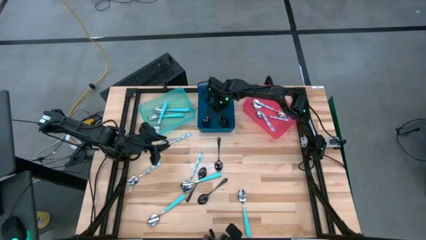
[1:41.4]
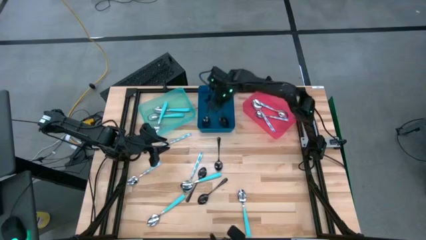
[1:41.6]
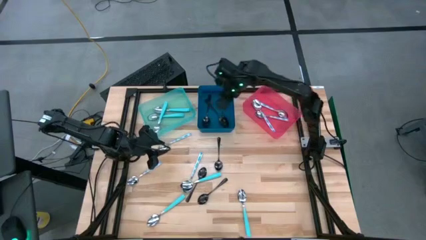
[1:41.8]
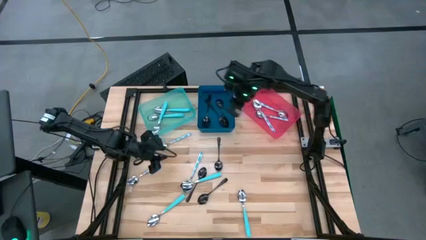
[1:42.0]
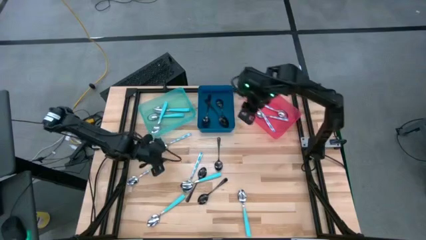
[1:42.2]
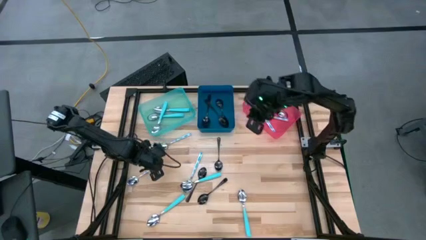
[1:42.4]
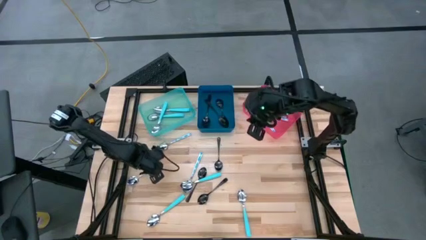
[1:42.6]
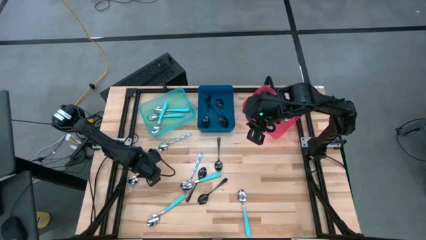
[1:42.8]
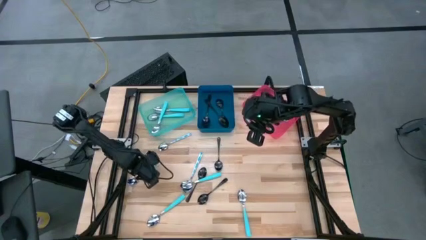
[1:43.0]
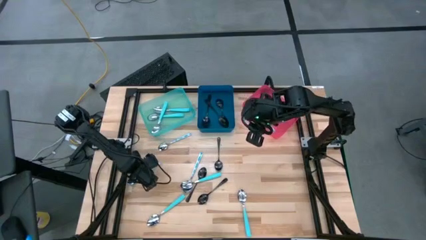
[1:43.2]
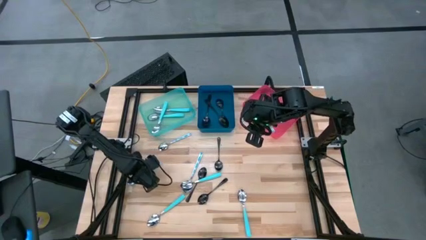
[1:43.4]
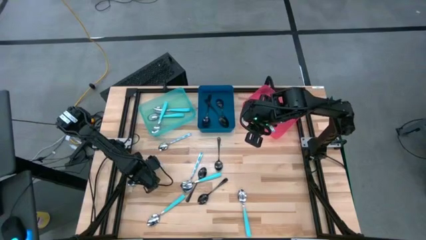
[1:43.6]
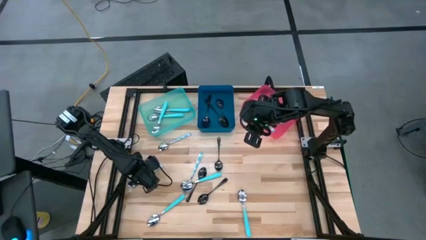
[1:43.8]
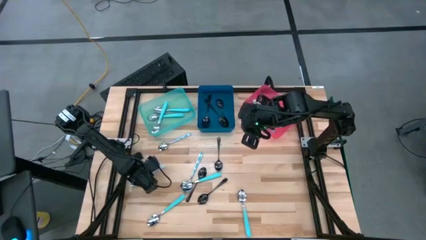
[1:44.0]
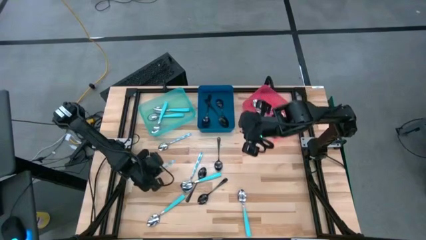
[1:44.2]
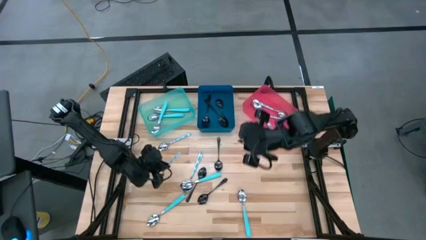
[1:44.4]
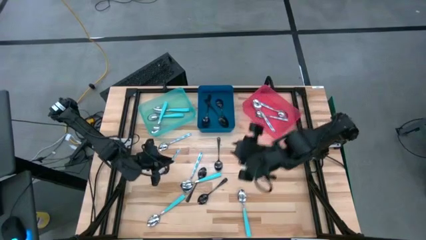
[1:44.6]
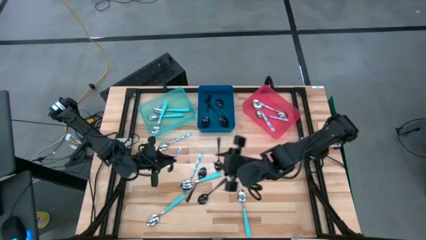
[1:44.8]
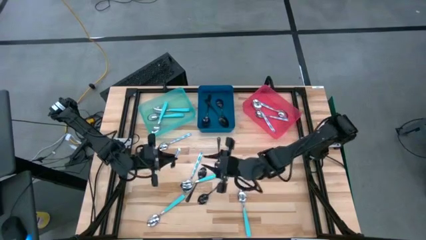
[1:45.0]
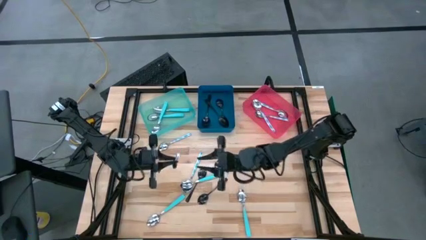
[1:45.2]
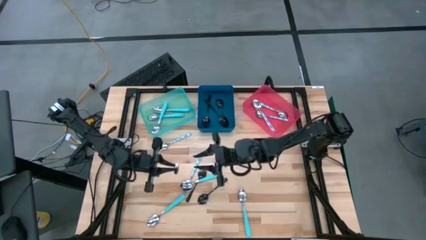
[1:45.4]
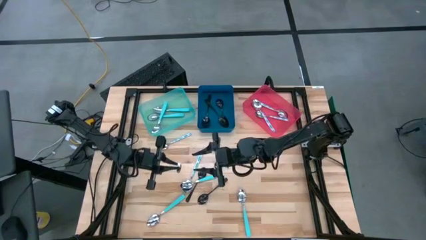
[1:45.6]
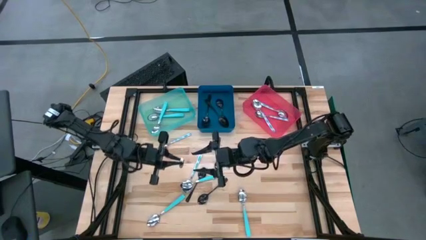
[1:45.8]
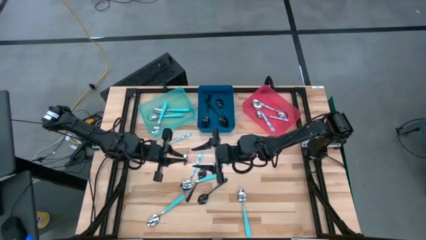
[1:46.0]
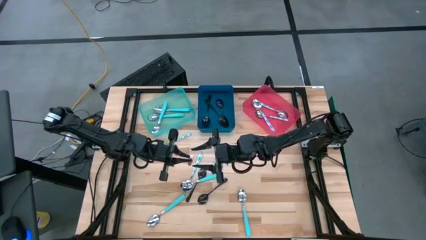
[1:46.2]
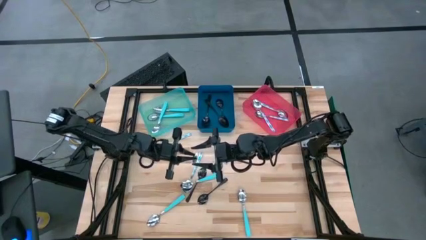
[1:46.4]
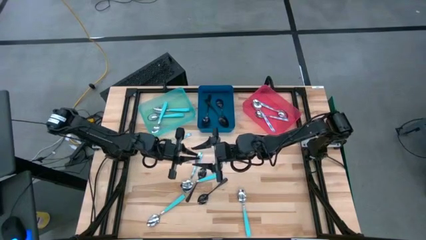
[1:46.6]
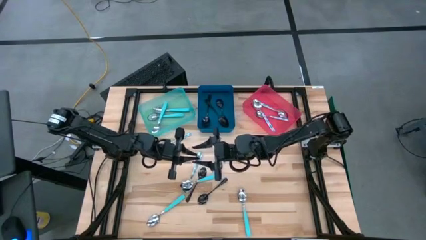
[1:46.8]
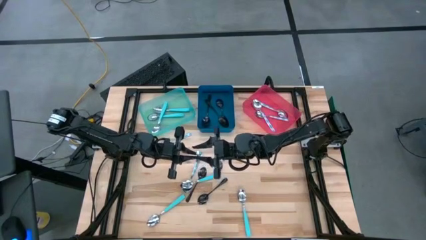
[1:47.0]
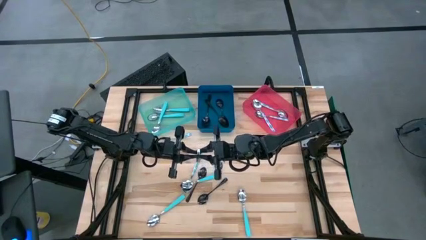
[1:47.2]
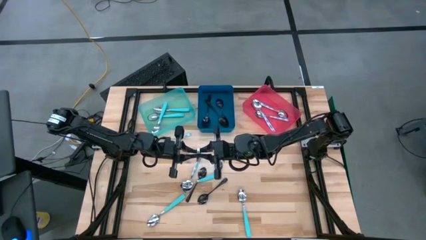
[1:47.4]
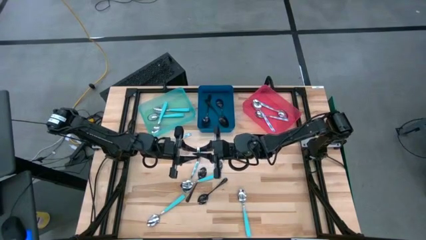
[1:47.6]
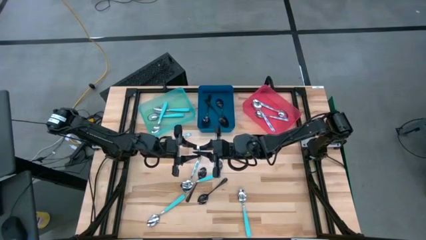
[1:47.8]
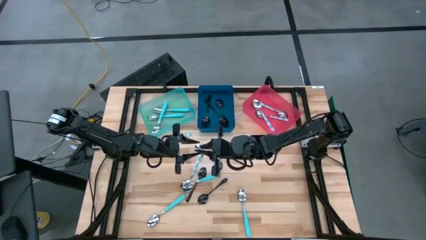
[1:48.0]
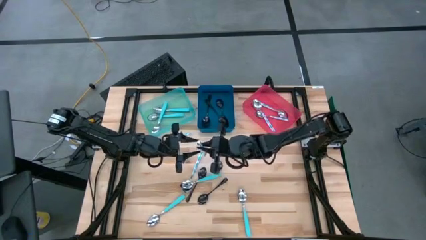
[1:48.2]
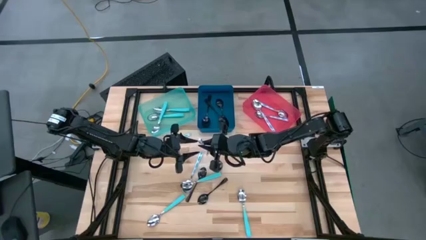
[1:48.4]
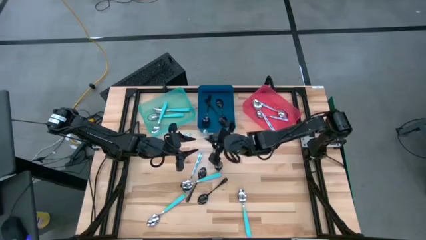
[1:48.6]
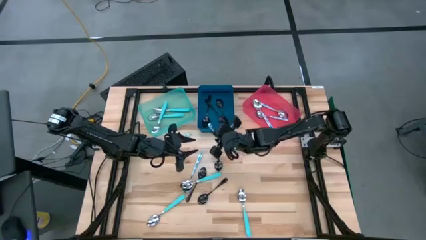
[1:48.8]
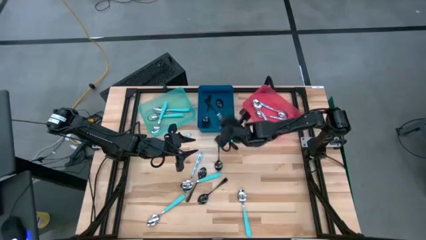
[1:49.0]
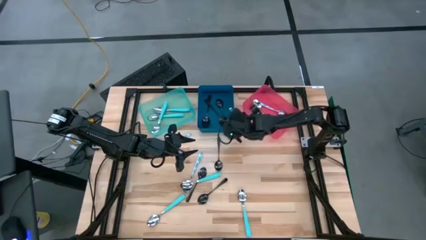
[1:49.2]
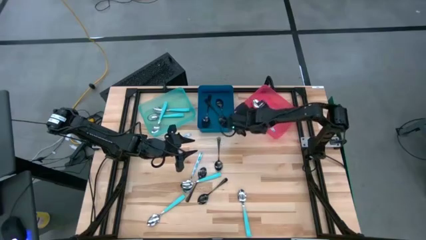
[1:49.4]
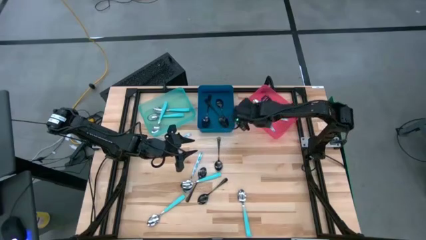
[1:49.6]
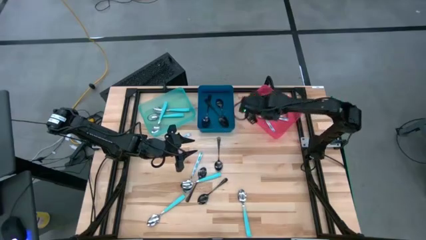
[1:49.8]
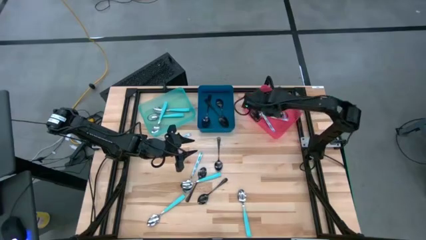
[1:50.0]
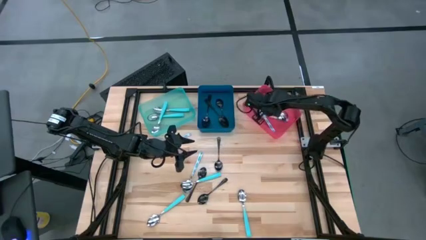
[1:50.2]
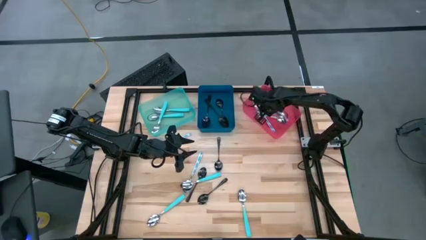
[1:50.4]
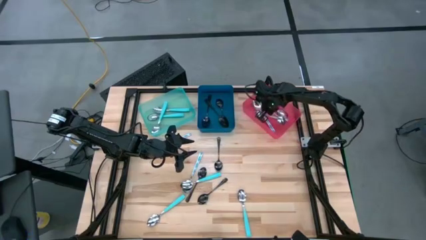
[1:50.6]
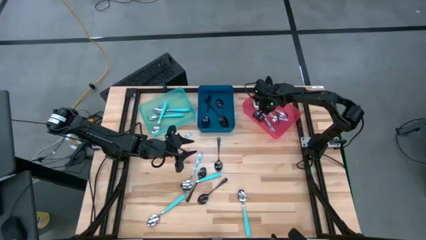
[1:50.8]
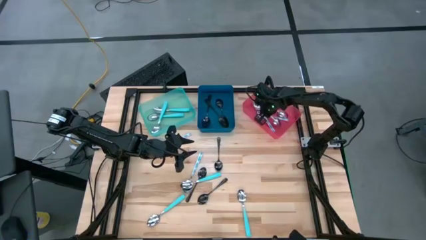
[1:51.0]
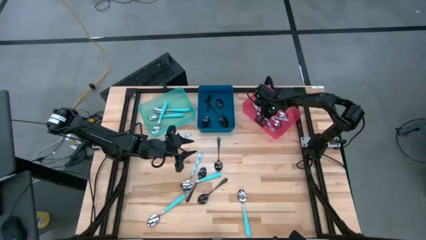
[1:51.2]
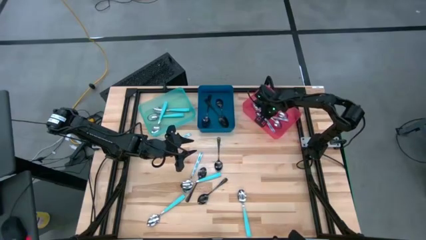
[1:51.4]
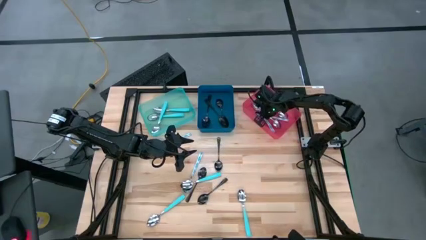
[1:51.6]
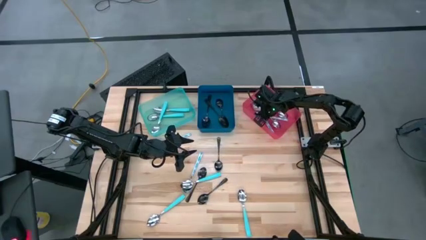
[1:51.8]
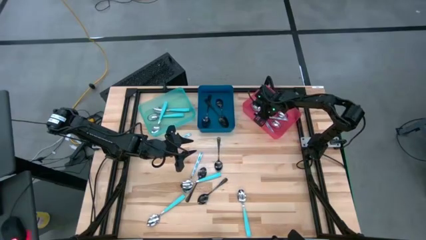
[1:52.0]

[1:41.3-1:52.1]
Task: Sort silverware by color (type)
Put the white patterned spoon into the pink bin

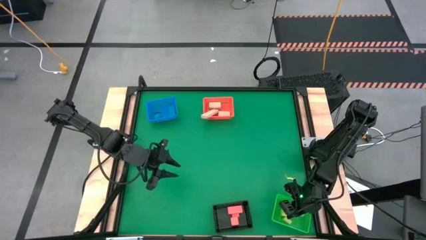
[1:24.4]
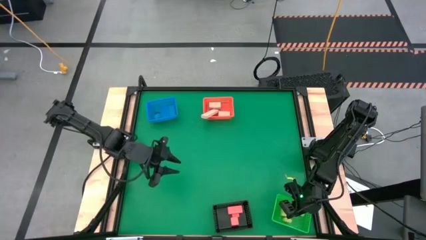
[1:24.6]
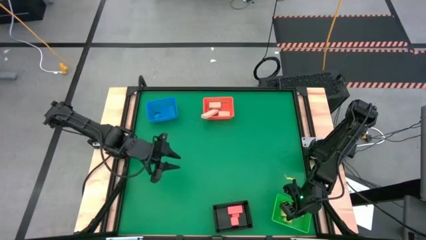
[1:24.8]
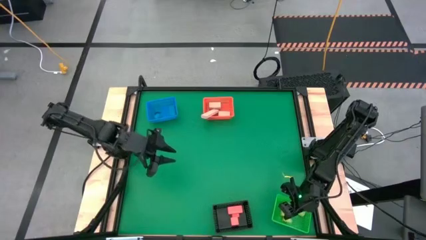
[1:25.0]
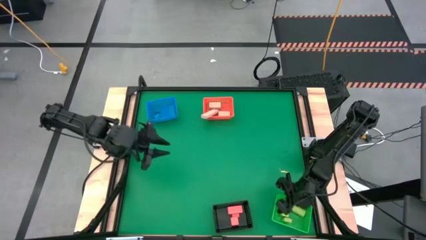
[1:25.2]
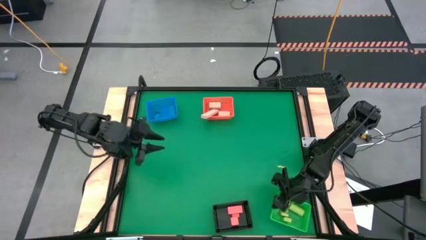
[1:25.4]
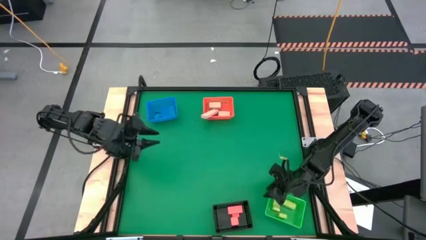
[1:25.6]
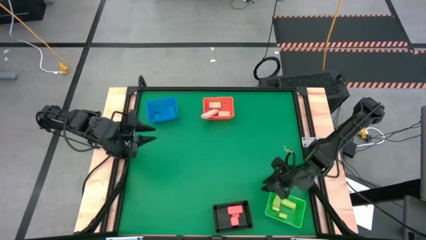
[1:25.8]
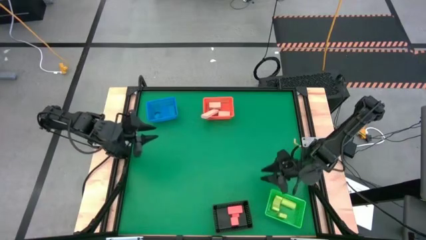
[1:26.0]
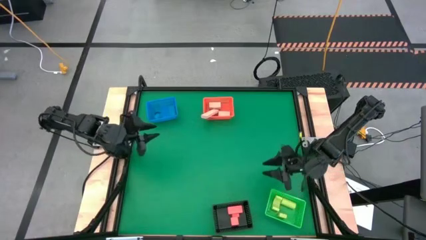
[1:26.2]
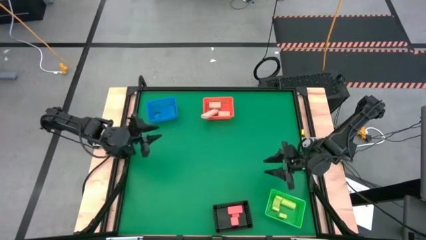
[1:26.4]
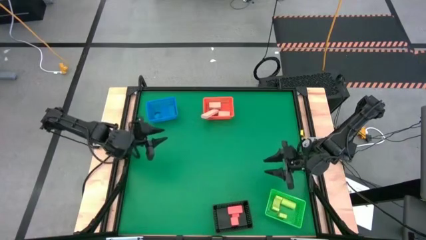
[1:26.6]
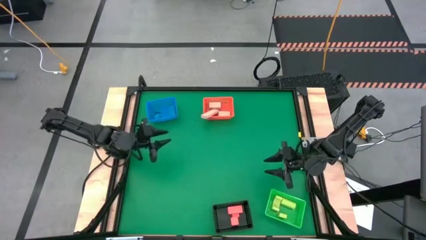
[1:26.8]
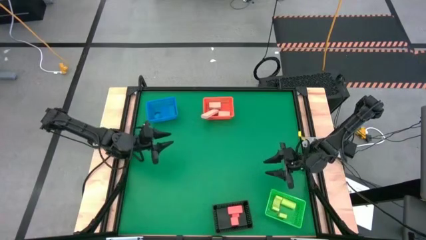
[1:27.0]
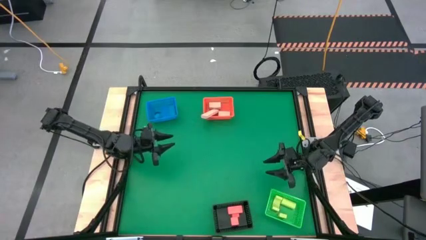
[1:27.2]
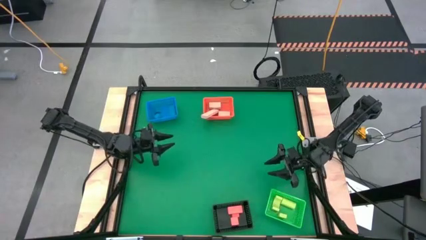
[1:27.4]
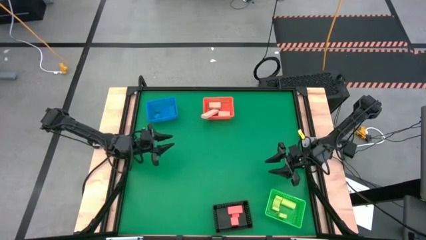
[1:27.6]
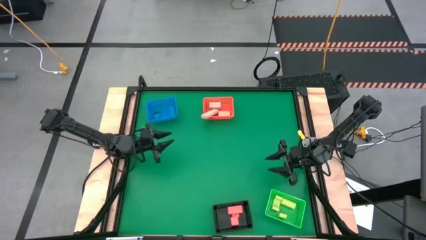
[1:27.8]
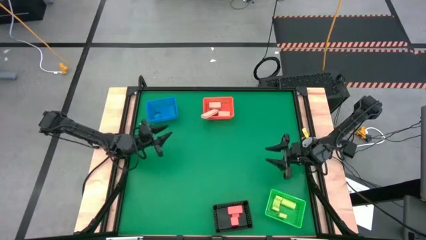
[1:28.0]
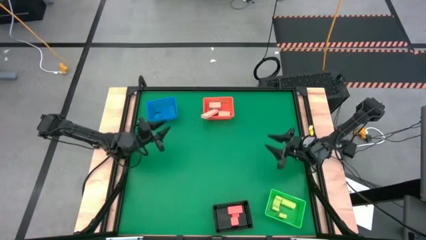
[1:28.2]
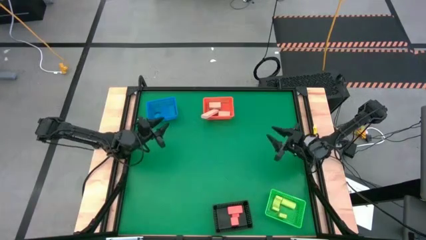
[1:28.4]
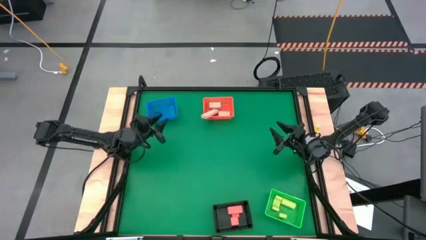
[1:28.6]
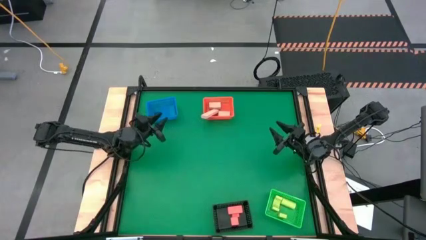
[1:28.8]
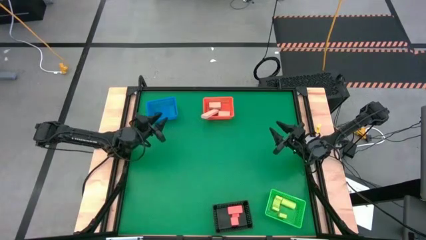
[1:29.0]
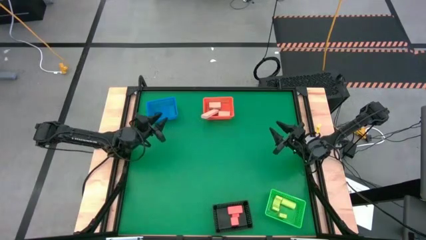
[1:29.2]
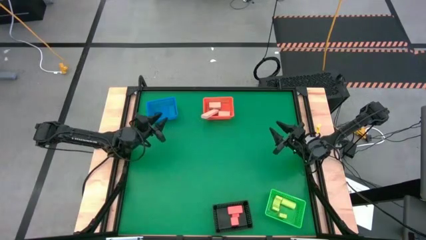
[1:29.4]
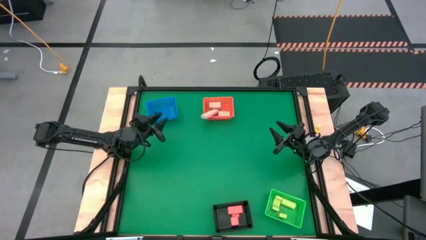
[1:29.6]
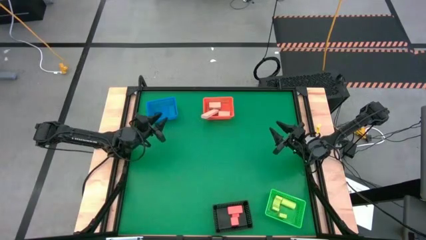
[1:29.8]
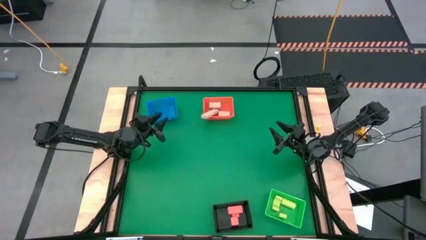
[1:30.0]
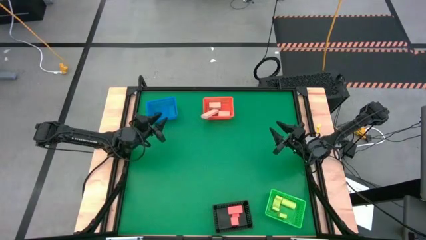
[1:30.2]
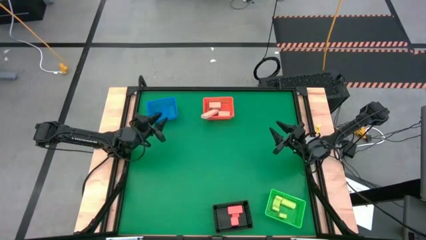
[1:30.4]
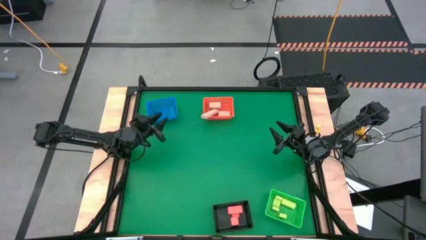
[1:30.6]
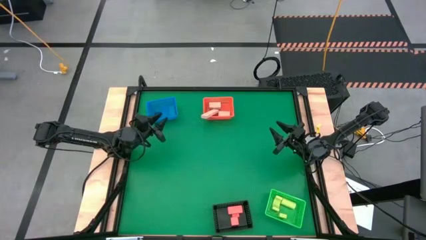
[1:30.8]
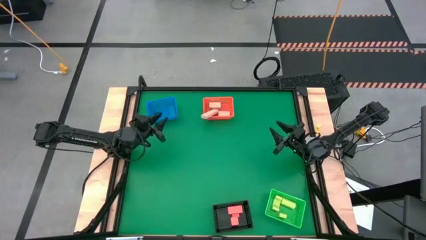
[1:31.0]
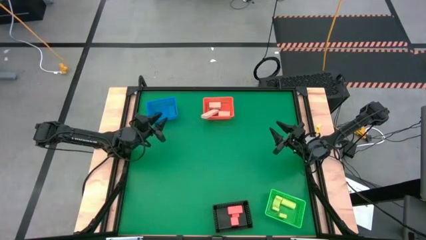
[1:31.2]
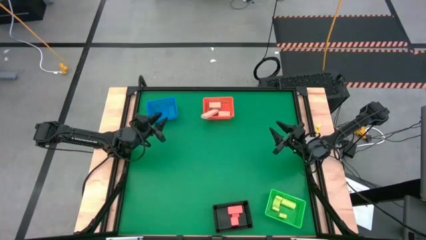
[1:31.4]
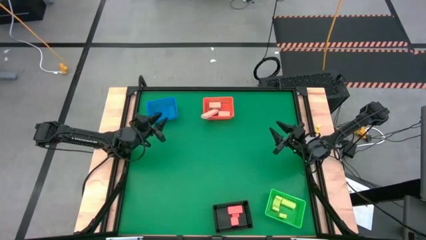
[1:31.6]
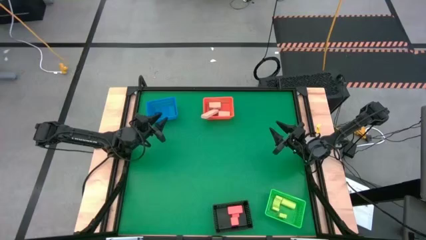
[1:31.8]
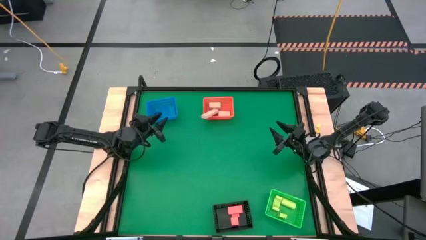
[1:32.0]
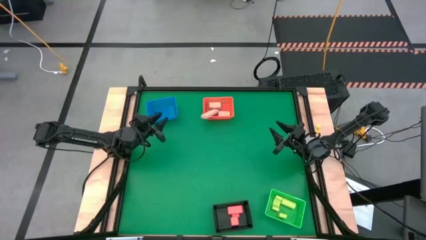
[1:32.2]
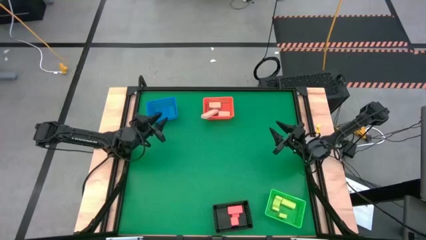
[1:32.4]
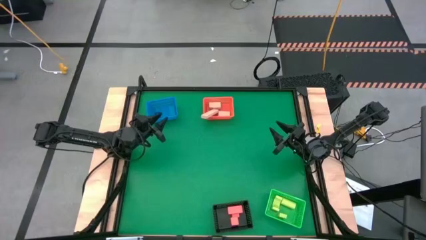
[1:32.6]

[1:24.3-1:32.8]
Task: Sort & place blocks by color
Return to Home Position
